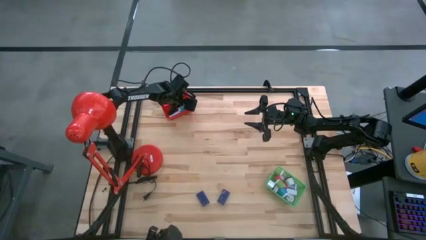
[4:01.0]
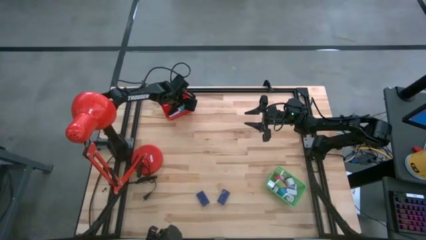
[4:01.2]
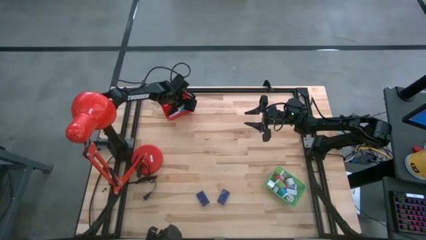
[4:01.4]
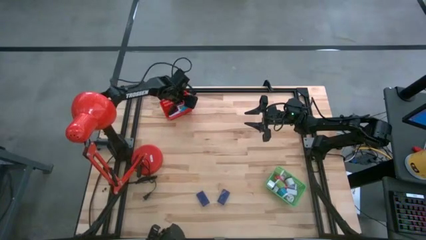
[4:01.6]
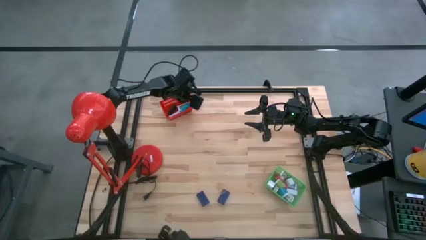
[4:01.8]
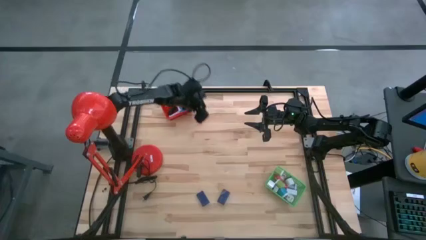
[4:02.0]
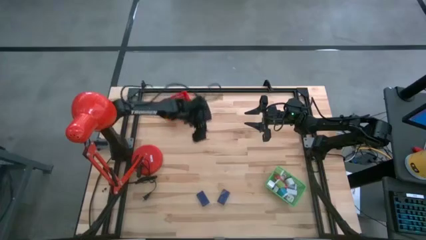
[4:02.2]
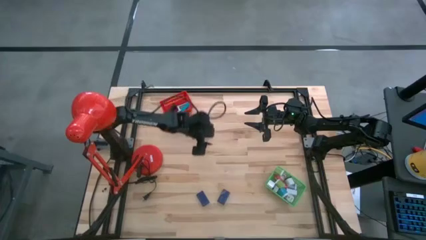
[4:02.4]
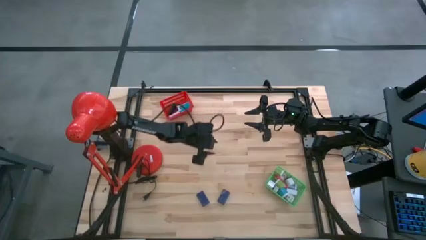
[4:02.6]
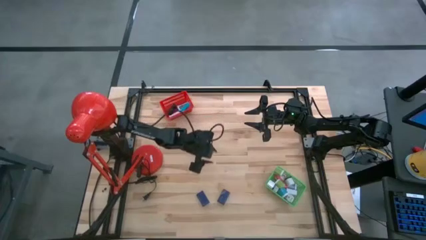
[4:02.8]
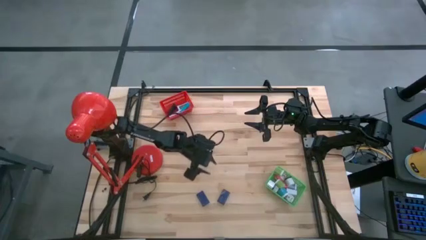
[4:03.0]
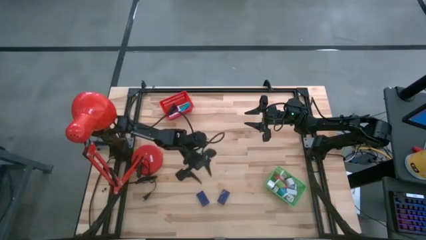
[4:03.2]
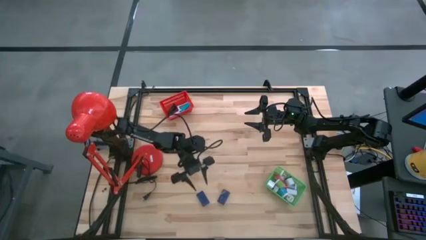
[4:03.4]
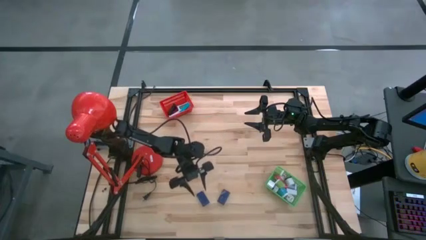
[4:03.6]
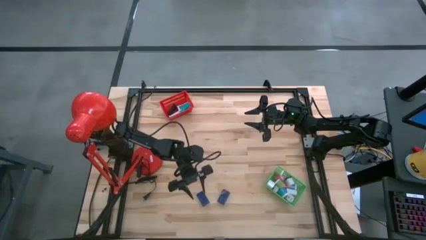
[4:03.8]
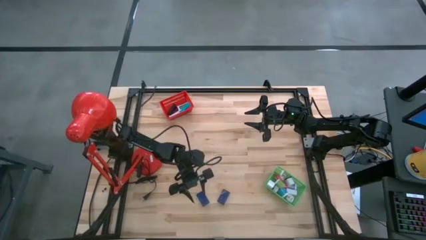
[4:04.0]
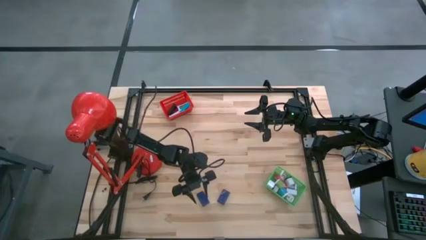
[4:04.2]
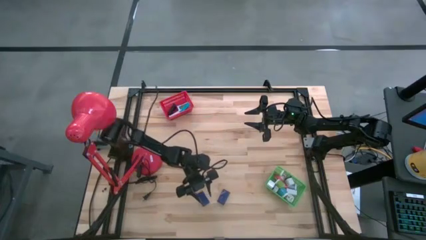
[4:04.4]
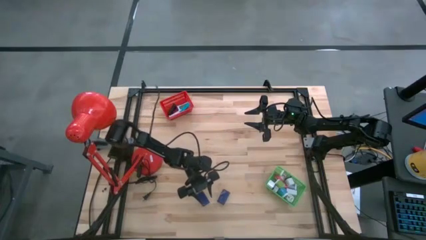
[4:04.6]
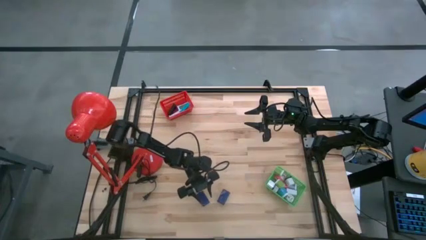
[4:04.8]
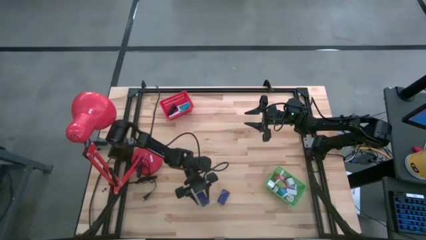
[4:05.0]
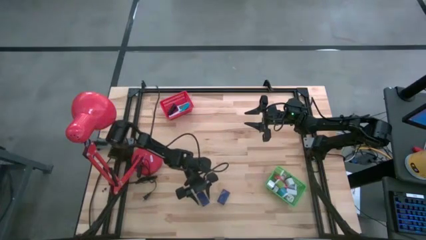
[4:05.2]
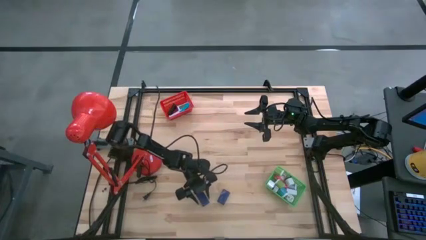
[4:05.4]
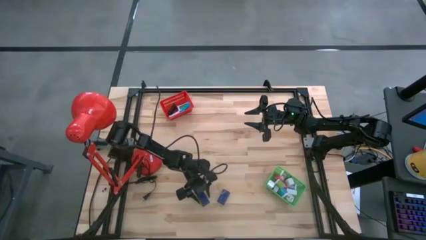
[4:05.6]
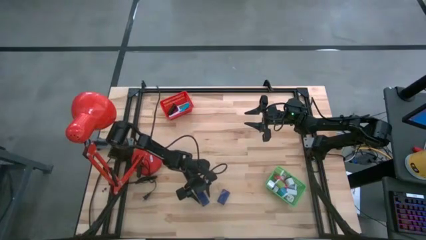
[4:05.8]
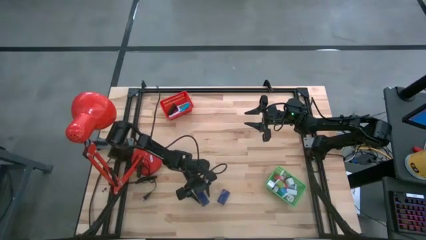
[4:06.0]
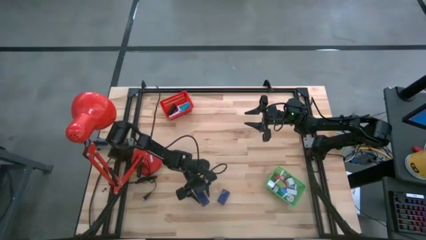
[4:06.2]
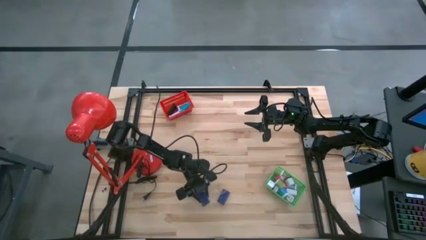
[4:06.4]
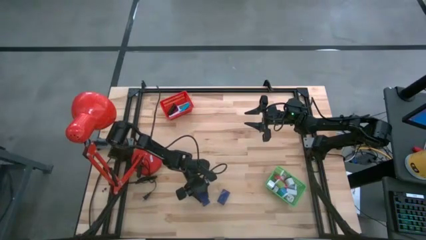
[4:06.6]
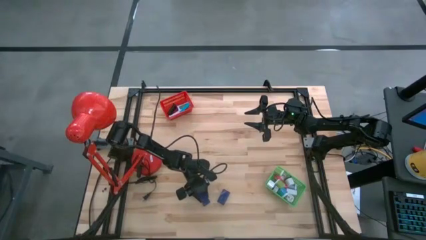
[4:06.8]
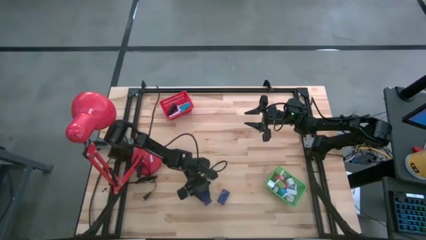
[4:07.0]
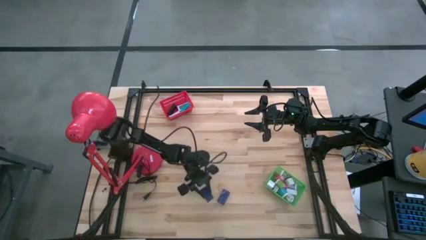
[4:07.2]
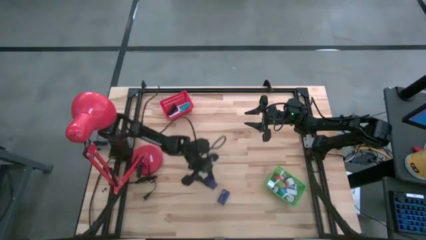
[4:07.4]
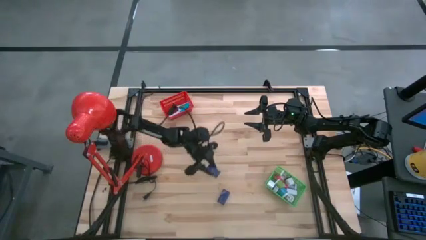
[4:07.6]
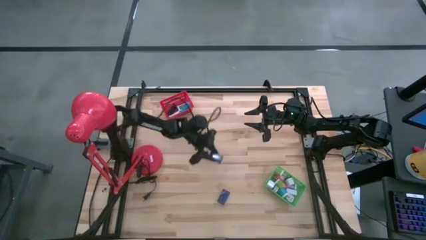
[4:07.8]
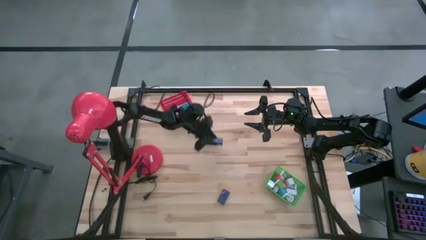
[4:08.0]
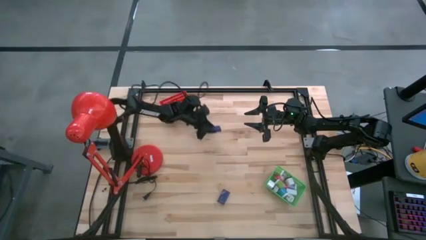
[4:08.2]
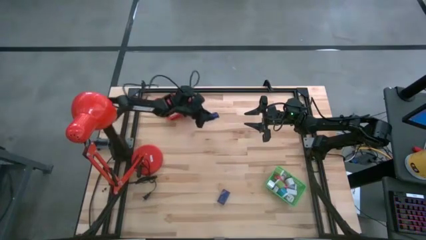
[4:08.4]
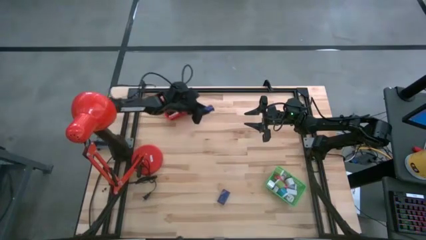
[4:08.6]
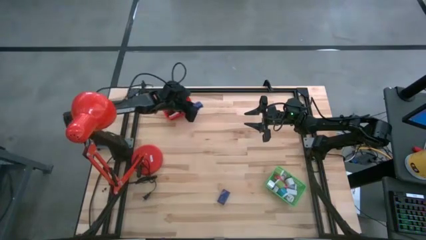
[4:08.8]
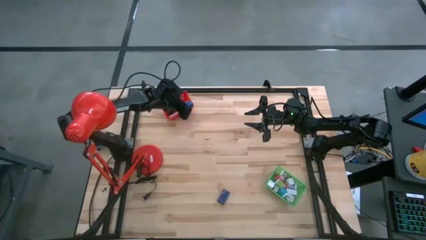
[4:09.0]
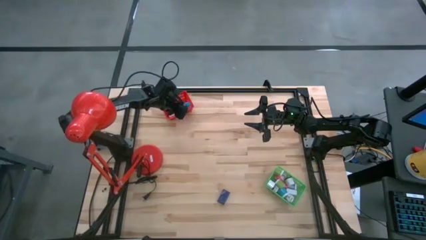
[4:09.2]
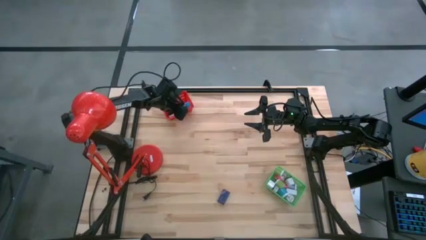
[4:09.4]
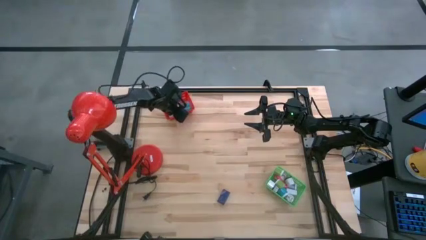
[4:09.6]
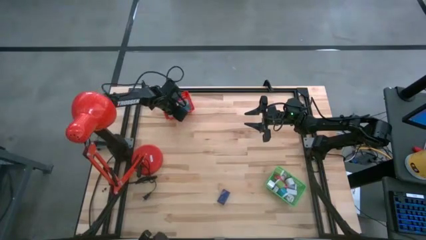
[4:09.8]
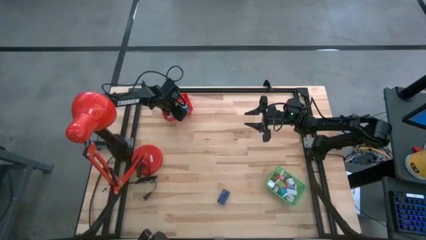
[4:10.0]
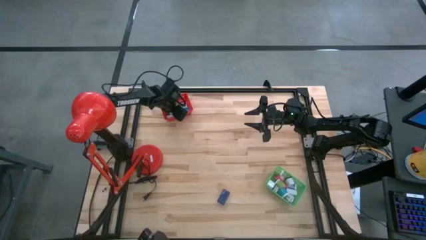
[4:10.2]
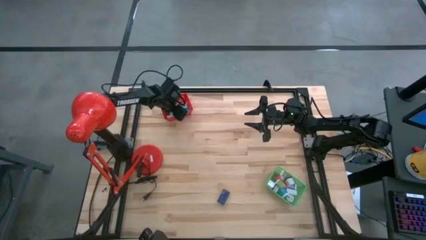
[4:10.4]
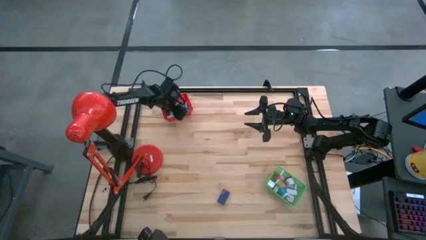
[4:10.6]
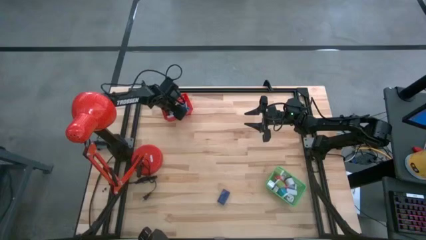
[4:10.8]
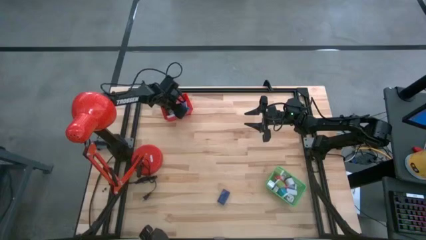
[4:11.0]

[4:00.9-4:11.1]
Task: Pick & Place Office items
Put the left dark blue digital clock into the red bin

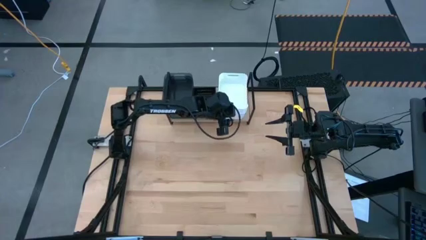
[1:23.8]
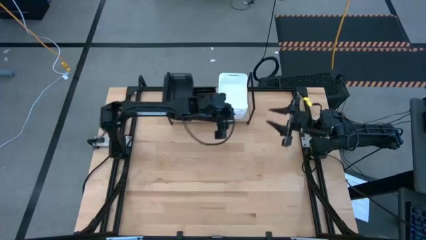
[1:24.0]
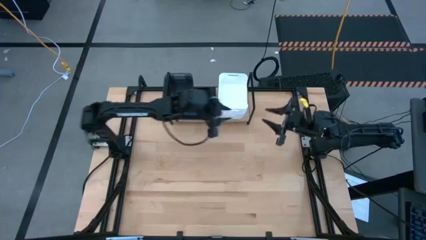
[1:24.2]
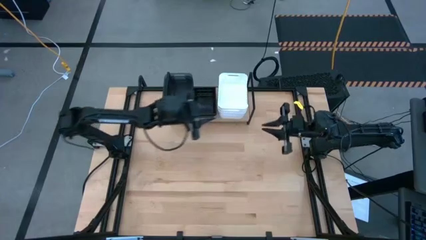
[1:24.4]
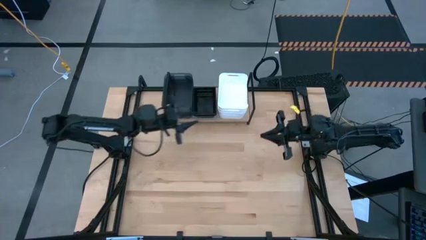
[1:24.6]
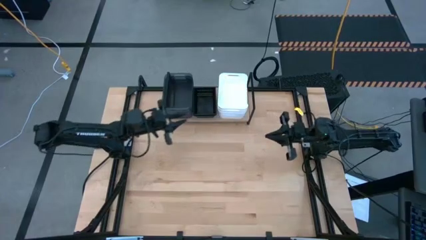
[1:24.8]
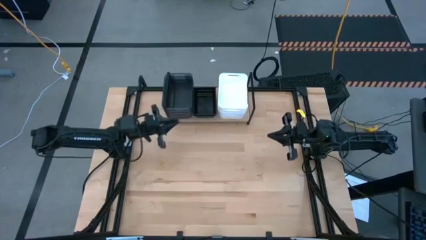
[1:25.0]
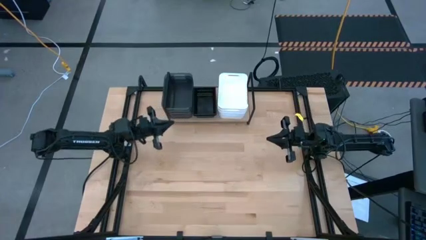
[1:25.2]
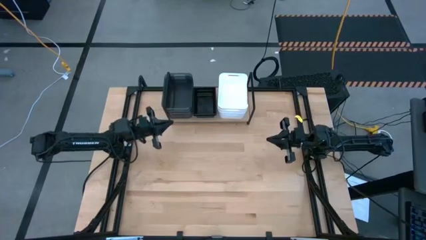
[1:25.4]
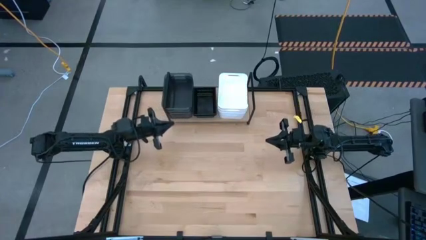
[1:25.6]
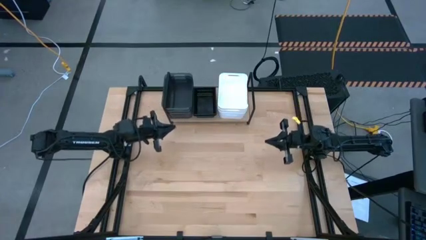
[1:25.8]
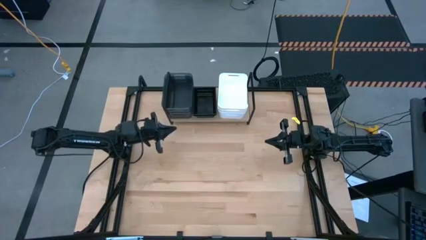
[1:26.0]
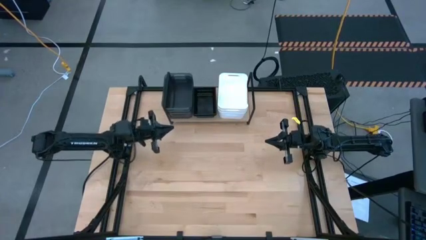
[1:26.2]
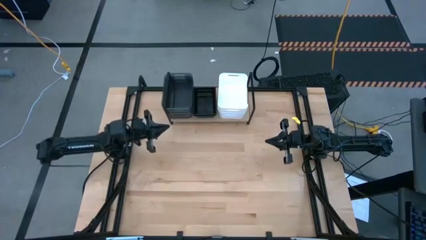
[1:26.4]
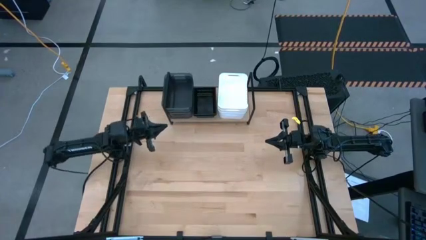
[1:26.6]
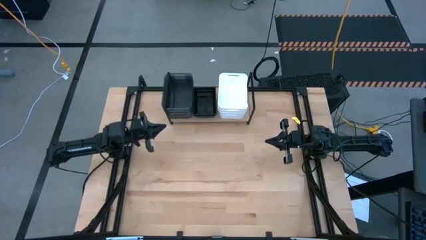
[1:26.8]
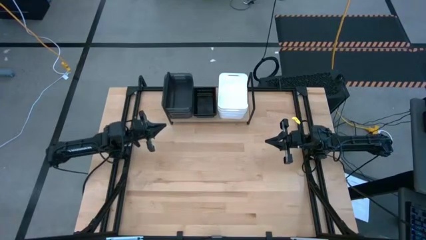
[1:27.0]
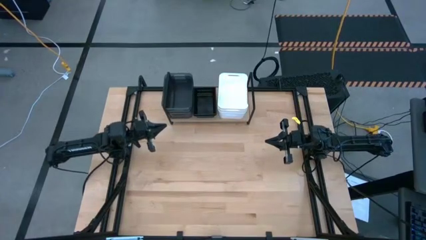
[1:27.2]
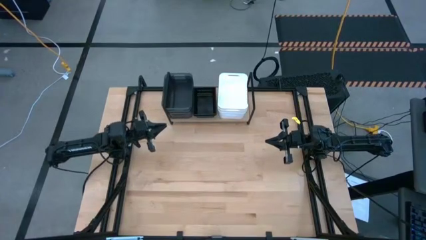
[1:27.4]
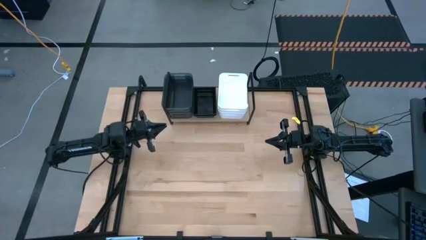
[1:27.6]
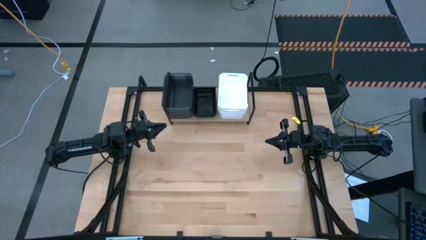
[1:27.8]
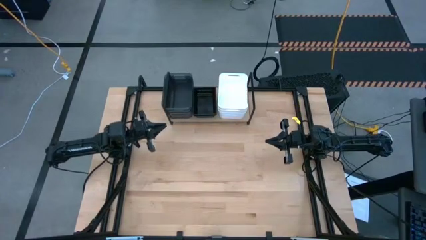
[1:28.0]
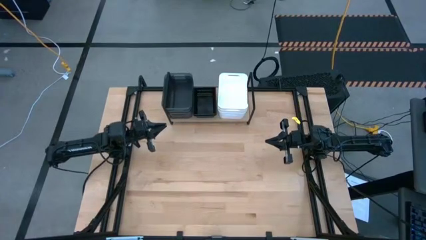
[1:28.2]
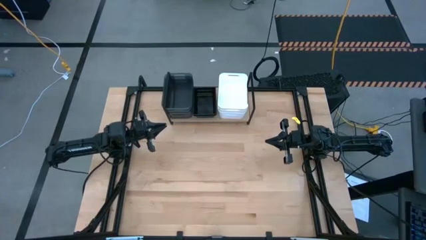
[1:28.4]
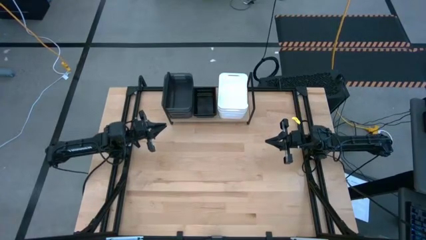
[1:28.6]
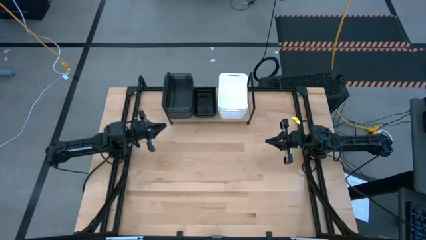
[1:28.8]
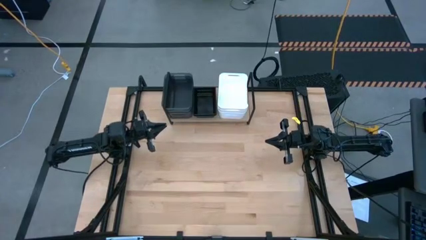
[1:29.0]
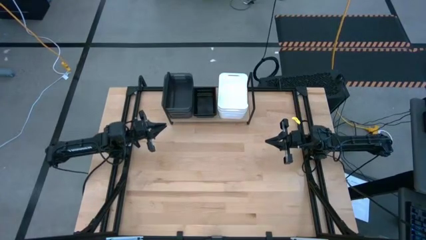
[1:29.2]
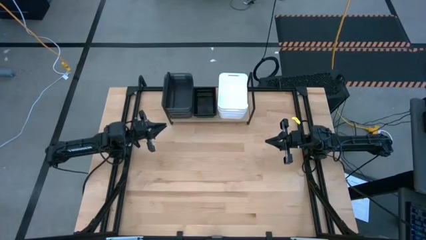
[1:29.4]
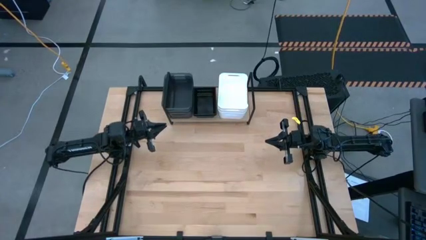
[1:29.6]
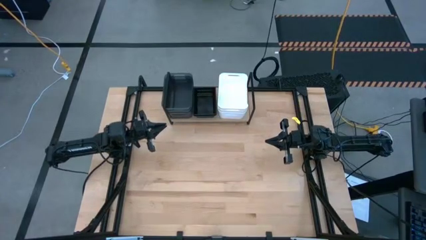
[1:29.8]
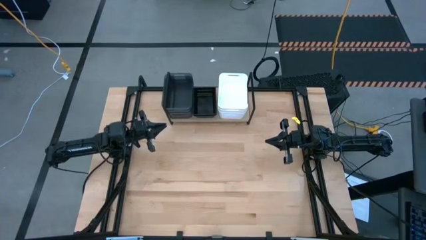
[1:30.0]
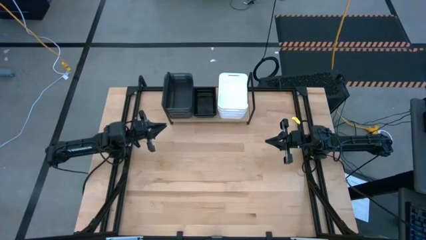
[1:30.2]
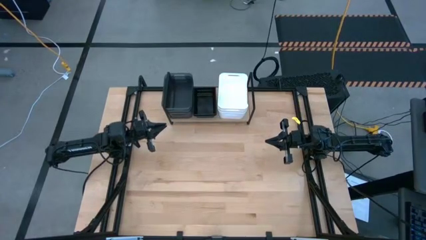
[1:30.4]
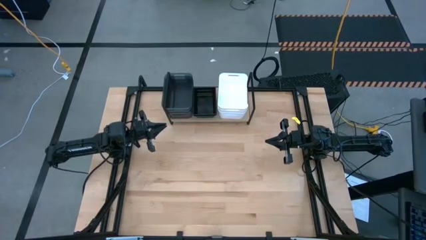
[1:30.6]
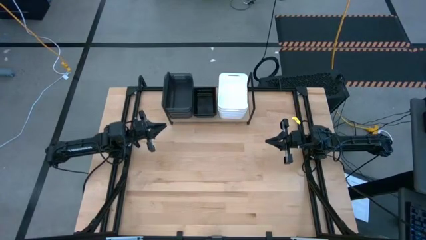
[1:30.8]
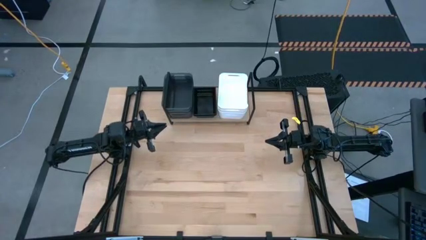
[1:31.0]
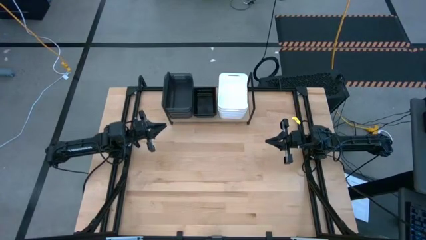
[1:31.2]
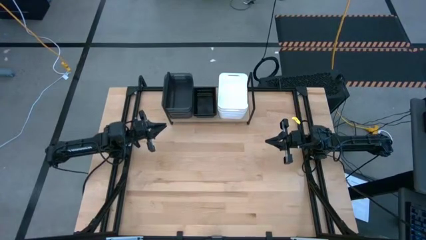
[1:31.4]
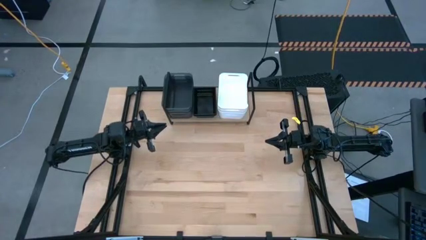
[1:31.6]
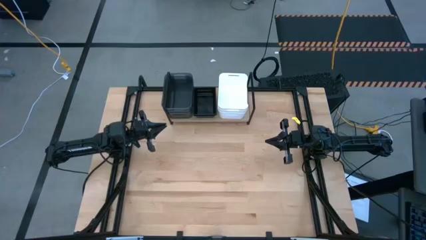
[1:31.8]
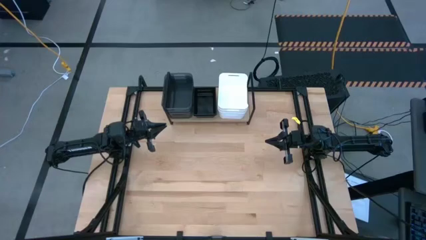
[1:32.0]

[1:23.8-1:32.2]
Task: Stack baskets on shelf by color
Return to Home Position
